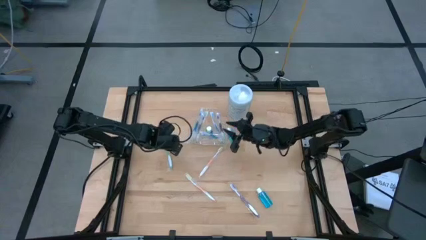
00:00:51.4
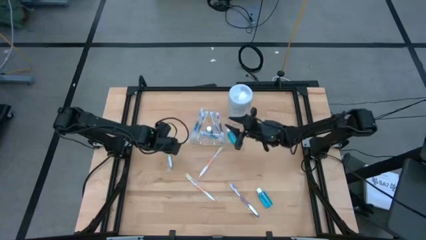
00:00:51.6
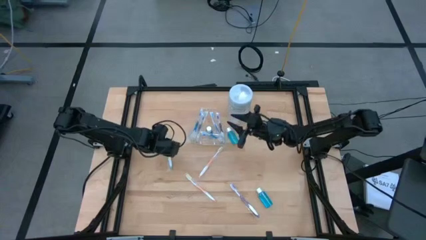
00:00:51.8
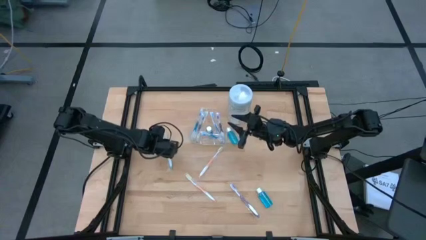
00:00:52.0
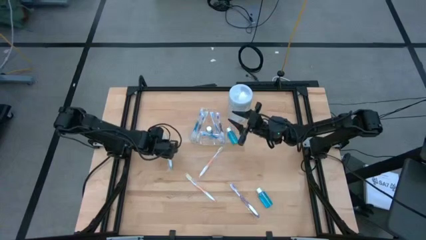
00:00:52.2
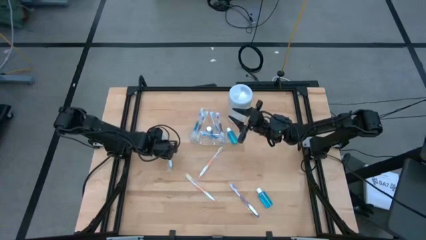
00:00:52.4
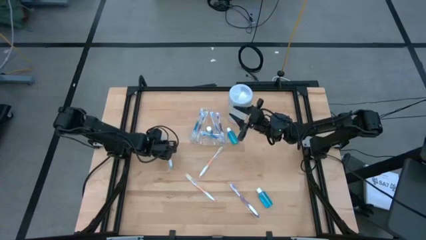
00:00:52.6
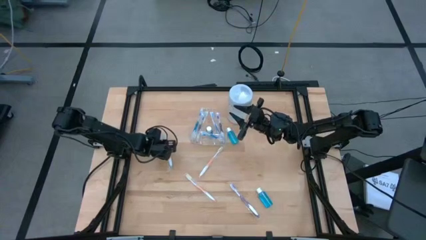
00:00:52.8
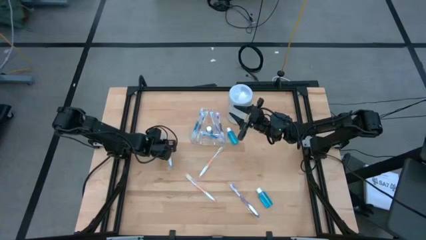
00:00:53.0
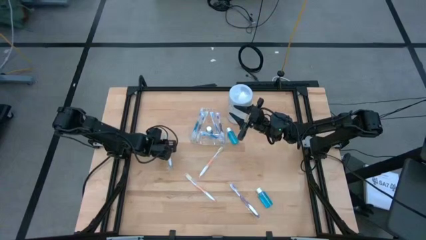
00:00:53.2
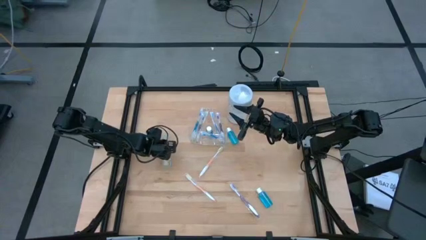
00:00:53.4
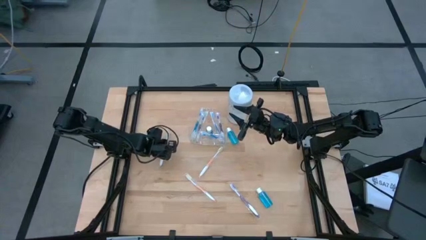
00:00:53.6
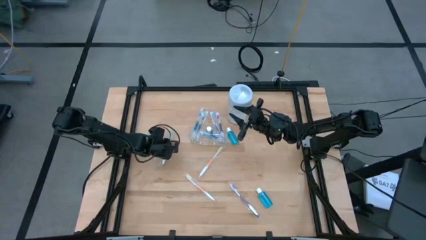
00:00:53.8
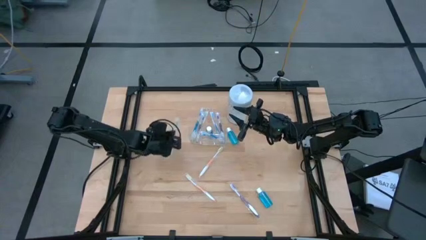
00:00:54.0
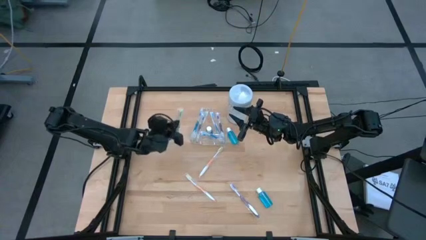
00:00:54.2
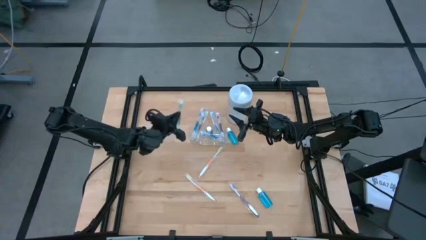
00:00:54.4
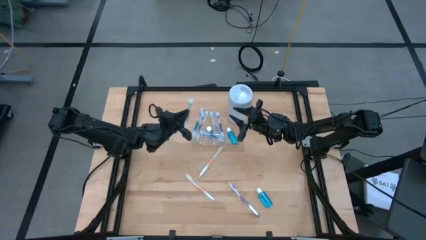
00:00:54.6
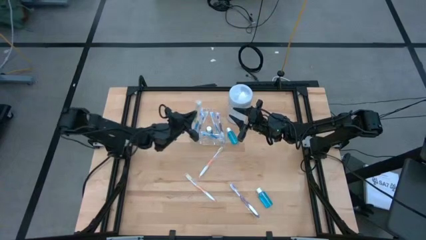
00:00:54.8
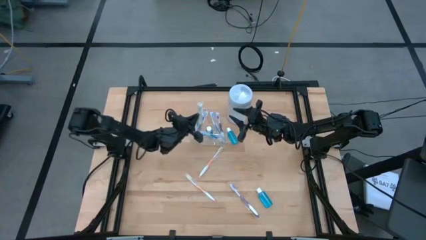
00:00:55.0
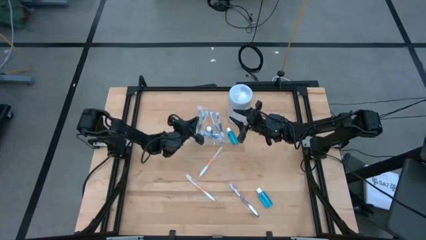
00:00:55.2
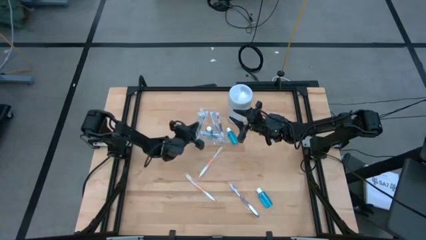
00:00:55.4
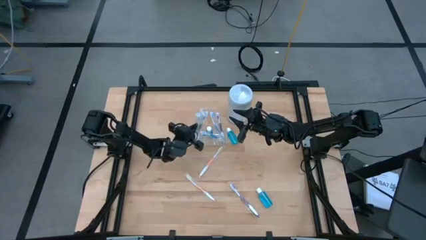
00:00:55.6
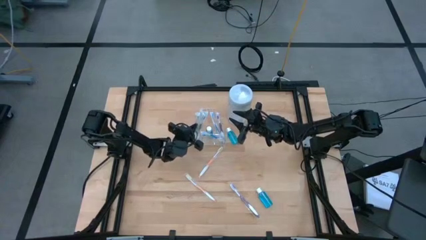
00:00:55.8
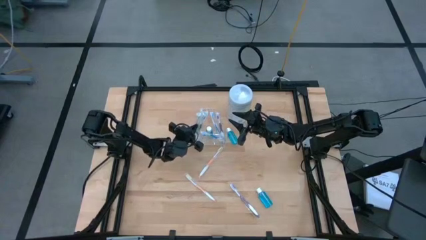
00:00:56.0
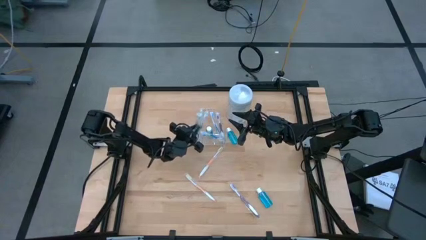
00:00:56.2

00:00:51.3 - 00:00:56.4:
Task: Pick & Place toothbrushing station
Put the green toothbrush into the transparent organizer

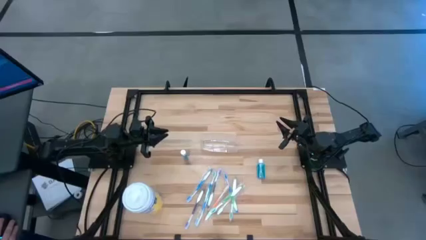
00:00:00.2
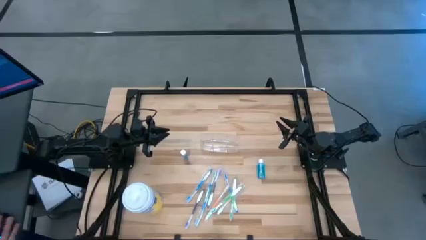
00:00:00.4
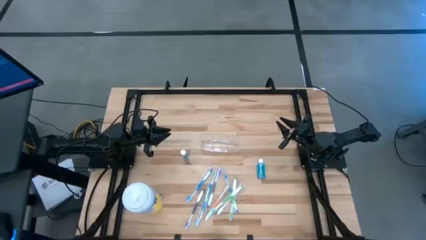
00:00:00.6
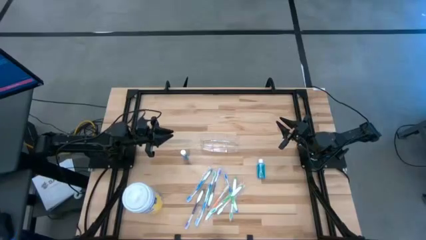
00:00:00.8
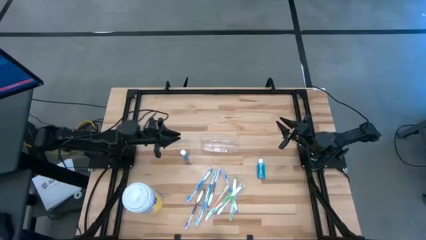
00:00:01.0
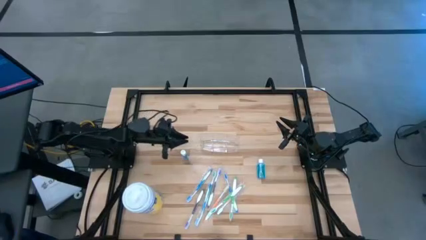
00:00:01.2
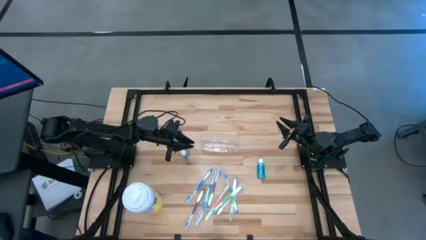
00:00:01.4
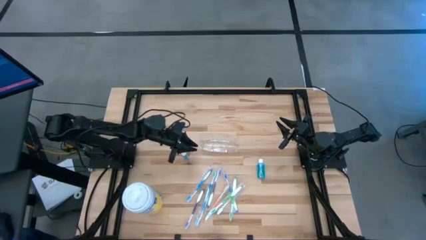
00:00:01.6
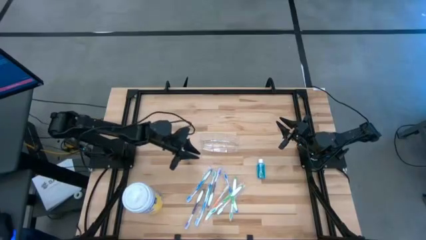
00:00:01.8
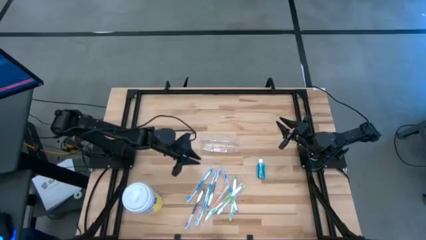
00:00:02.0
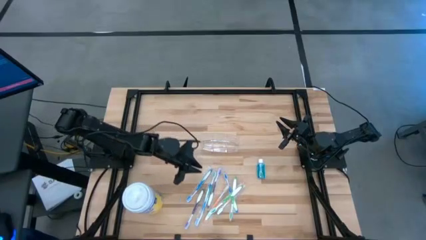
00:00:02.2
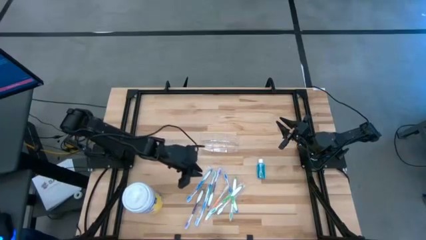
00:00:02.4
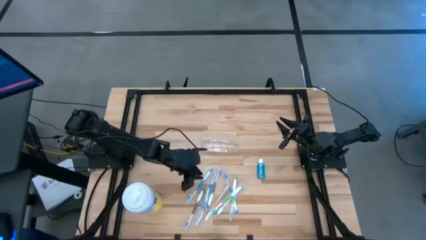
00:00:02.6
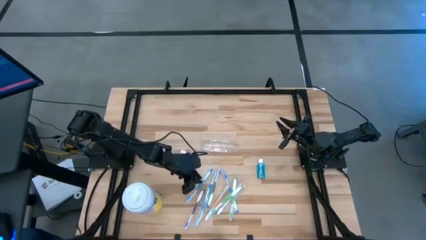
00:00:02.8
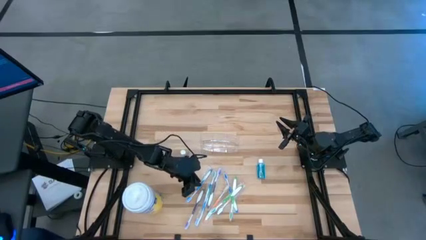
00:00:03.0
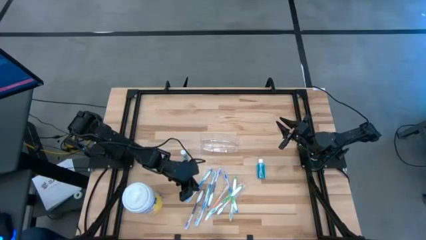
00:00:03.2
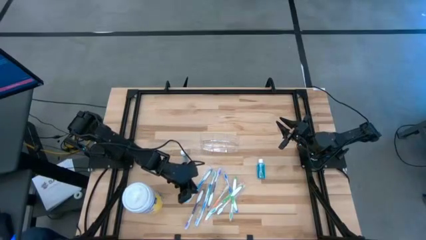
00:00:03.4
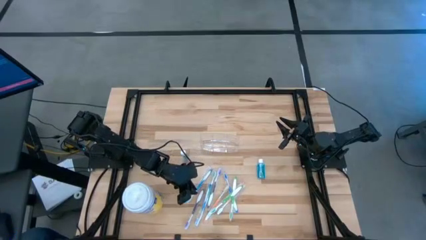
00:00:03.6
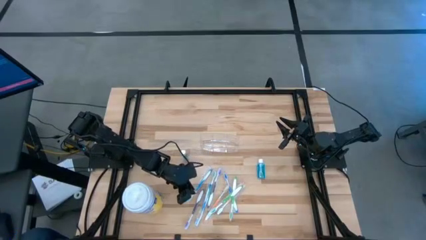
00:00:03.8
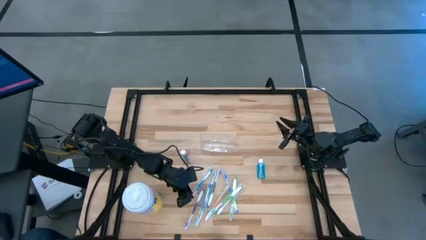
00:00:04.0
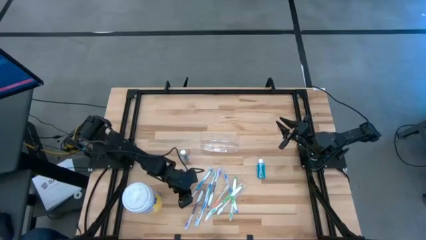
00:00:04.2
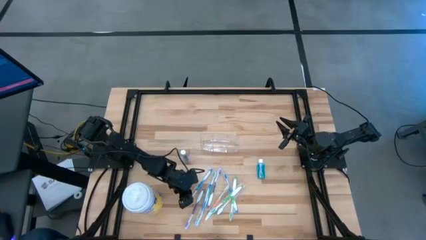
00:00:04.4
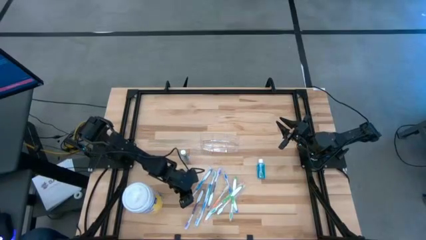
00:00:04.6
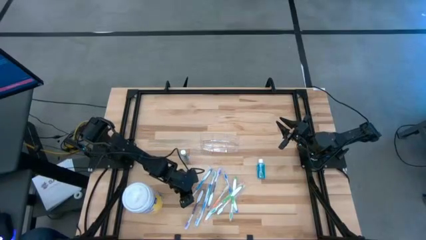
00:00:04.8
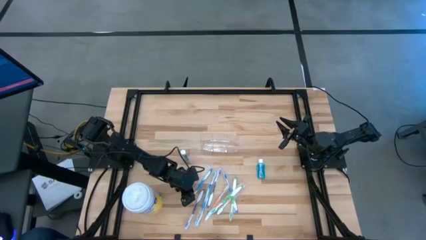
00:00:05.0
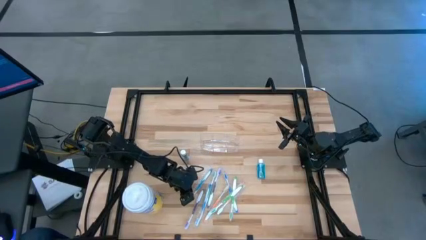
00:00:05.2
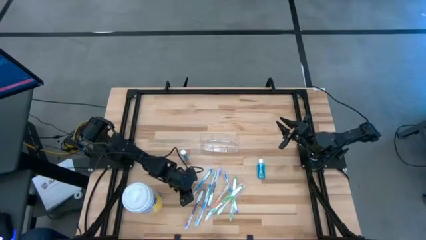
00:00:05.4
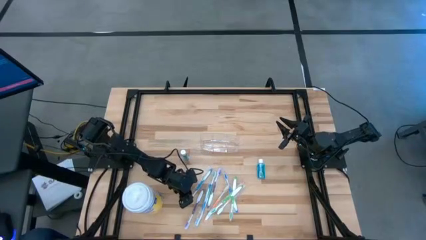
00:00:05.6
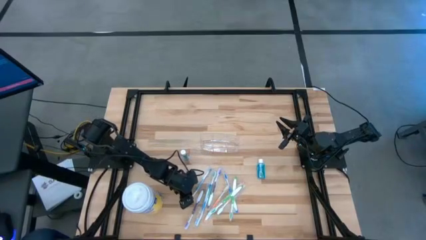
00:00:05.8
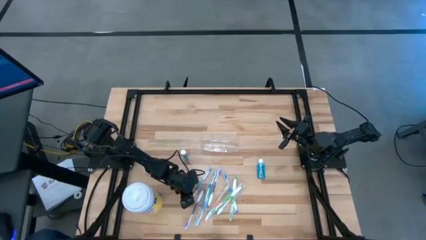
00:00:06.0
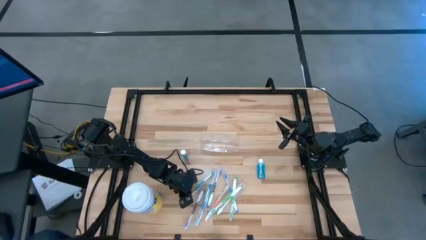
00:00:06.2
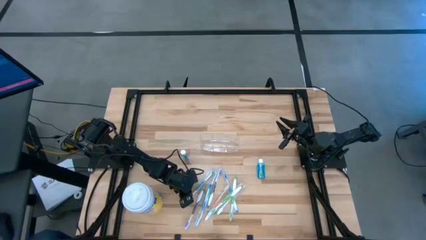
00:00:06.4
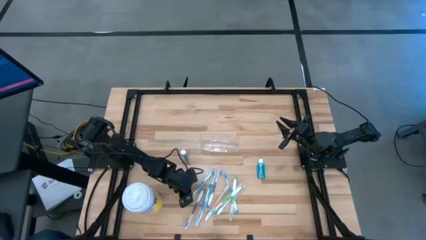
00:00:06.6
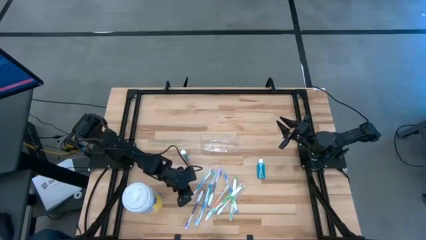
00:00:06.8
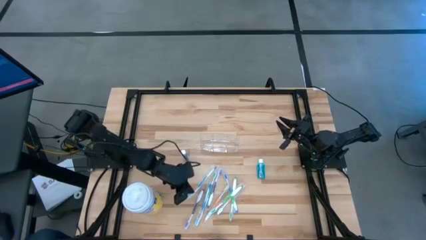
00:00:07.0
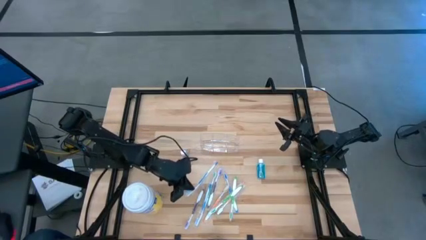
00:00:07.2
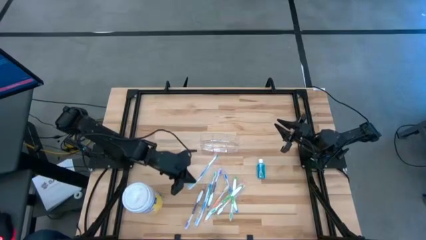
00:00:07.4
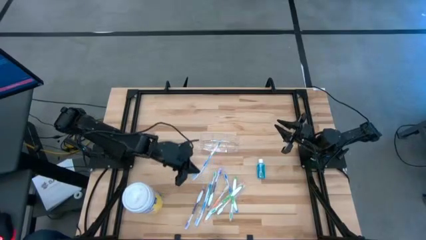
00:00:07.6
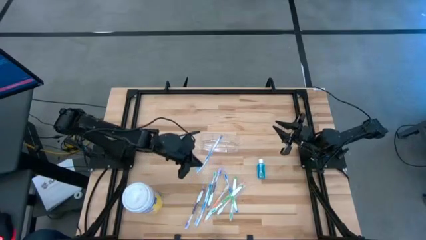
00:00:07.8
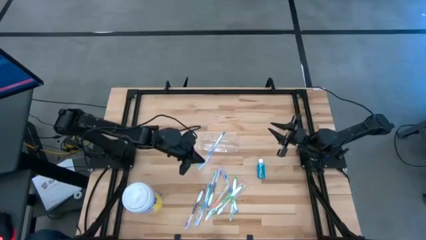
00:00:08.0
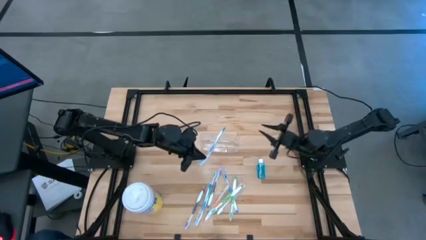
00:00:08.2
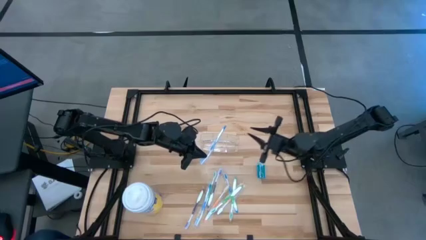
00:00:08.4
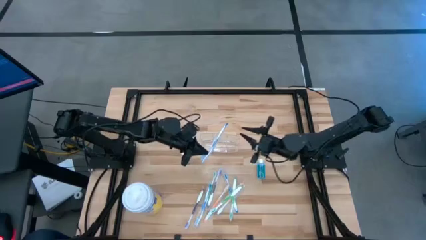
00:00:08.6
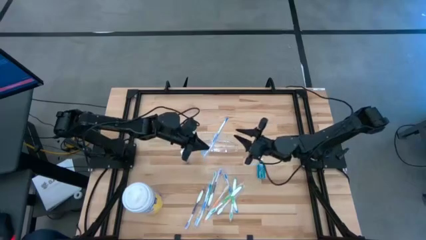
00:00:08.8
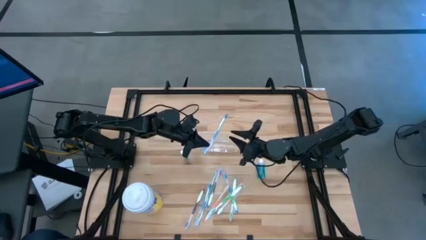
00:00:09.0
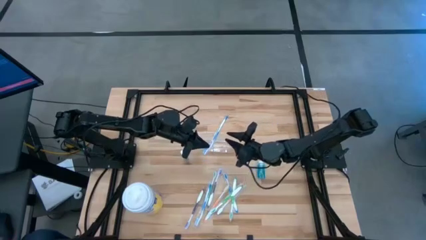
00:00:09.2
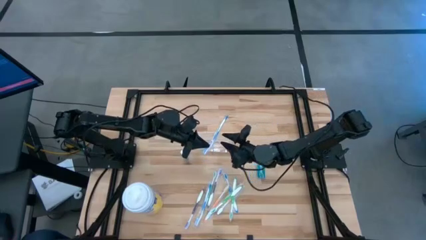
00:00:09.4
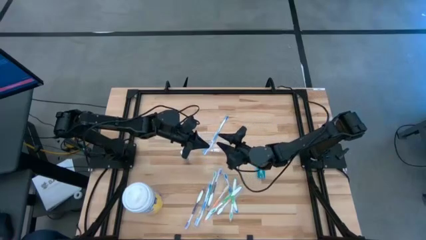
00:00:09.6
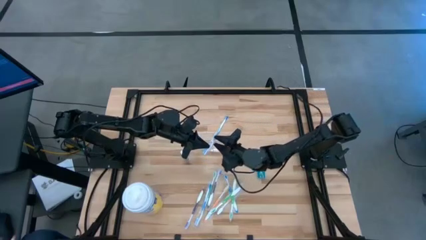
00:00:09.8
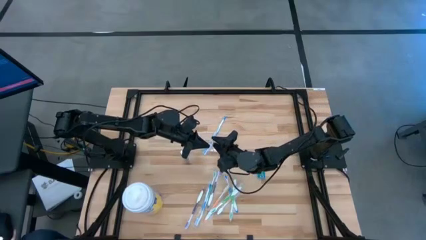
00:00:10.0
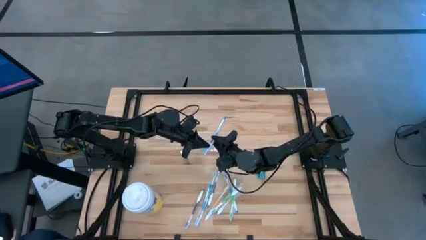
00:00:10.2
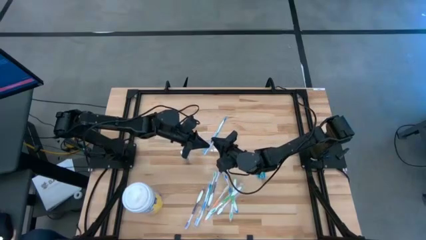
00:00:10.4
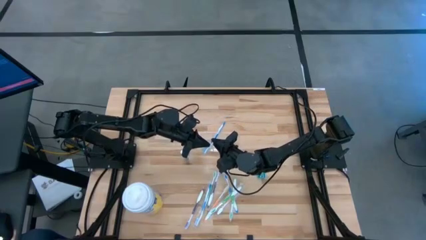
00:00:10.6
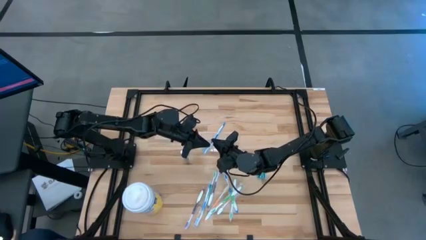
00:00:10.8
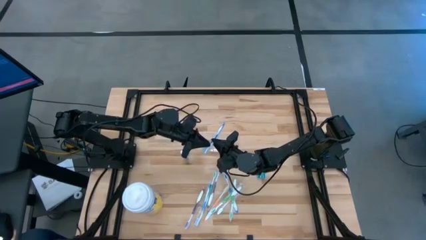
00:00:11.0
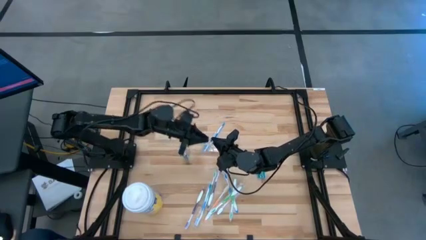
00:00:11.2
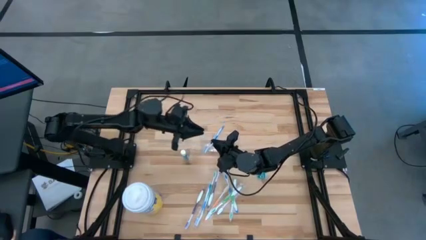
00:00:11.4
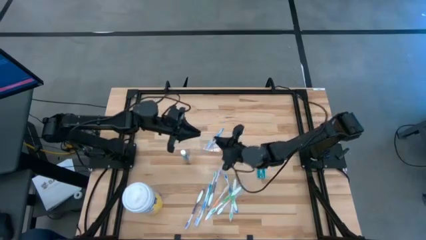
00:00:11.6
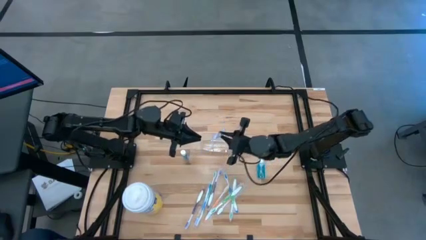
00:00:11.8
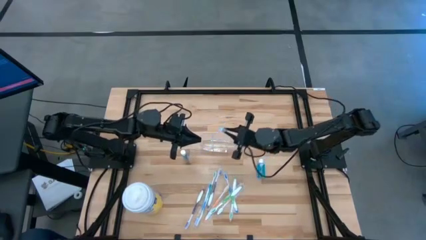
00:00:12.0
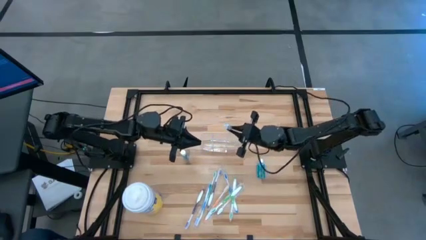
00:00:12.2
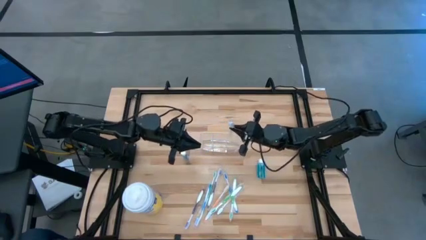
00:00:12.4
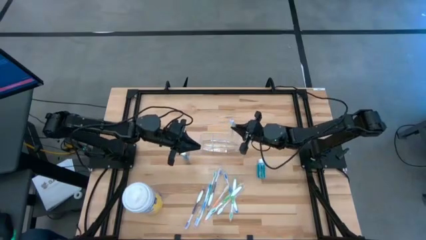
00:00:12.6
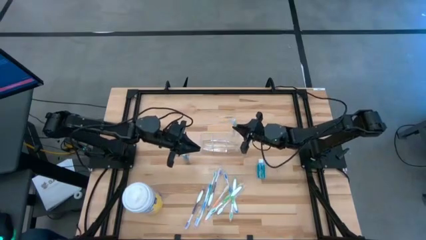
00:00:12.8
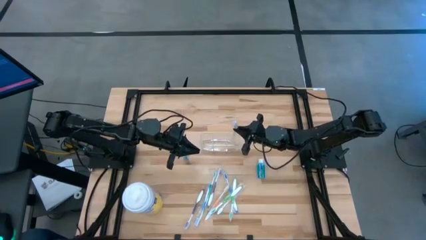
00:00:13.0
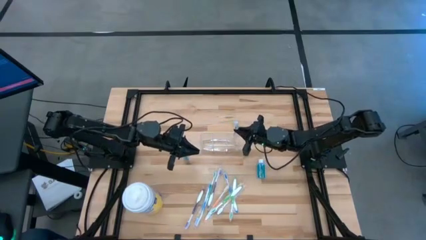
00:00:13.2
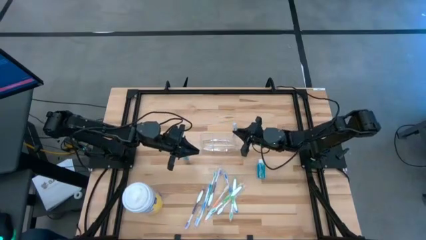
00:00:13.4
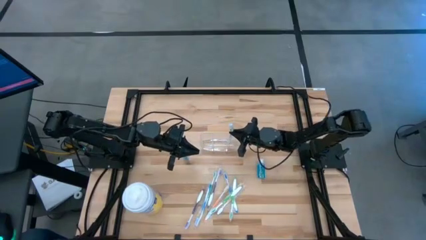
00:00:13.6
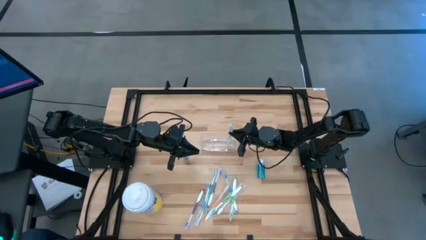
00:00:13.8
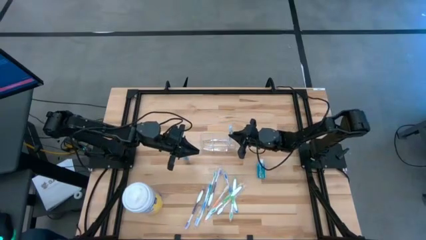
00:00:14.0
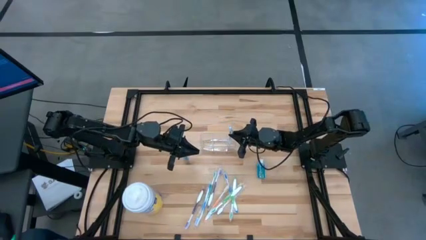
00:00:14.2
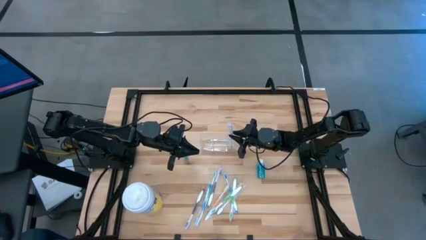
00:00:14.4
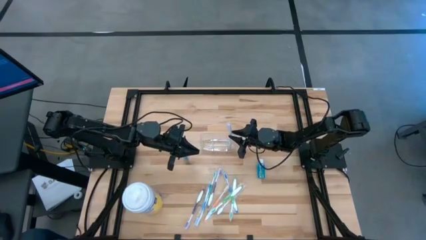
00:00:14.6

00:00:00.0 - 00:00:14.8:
Task: Pick & Place toothbrushing station
Put the blue toothbrush into the transparent organizer
